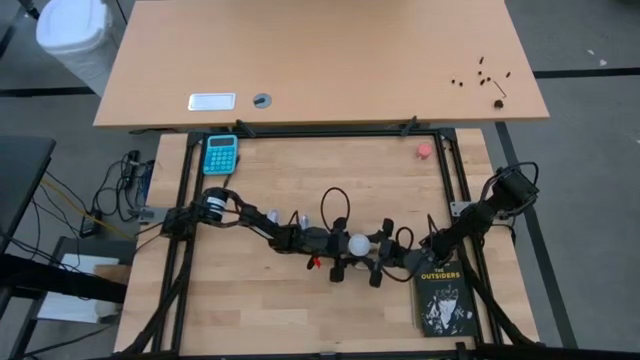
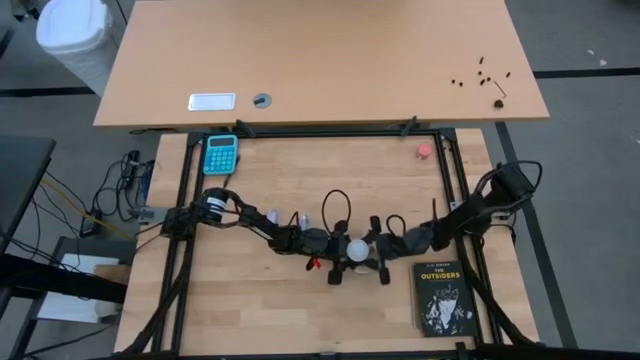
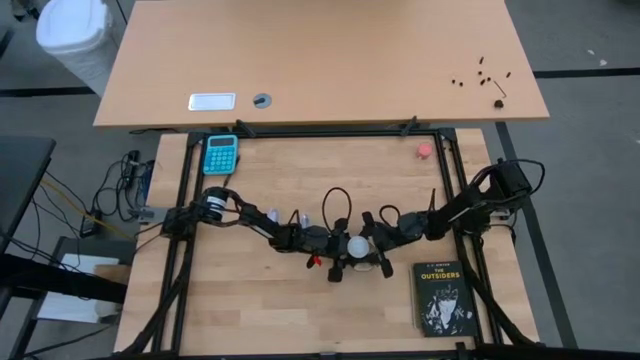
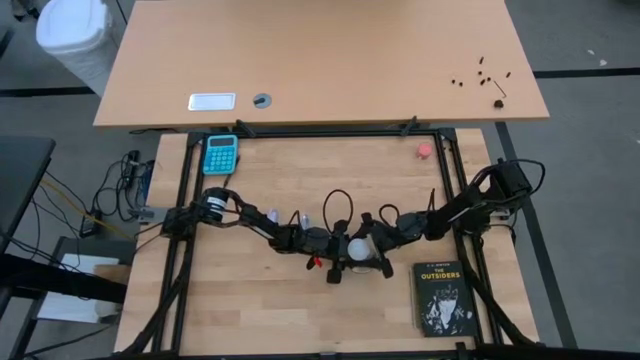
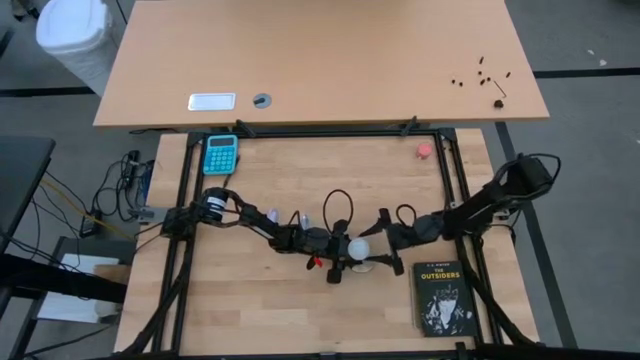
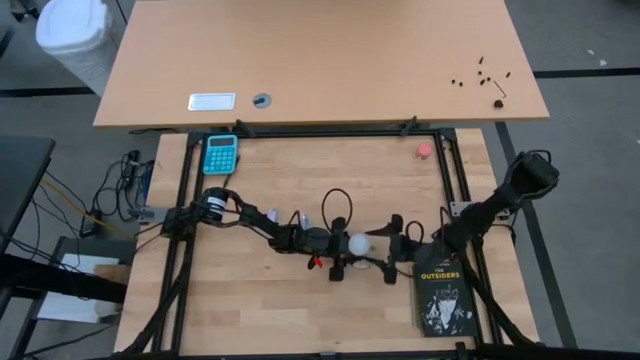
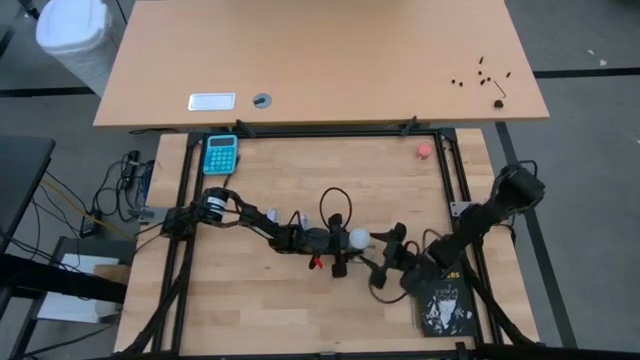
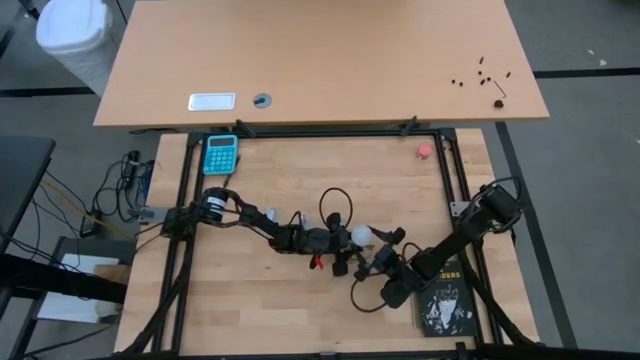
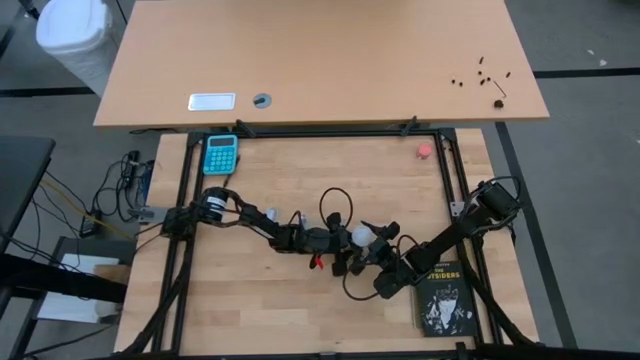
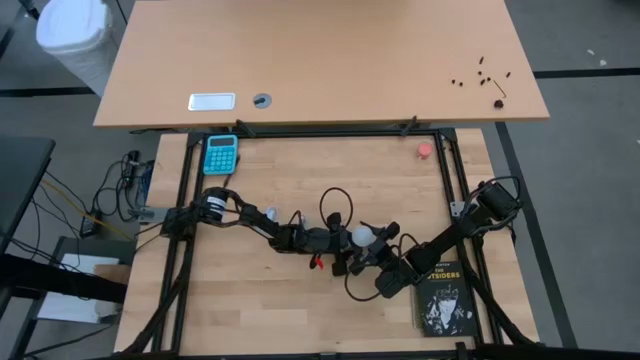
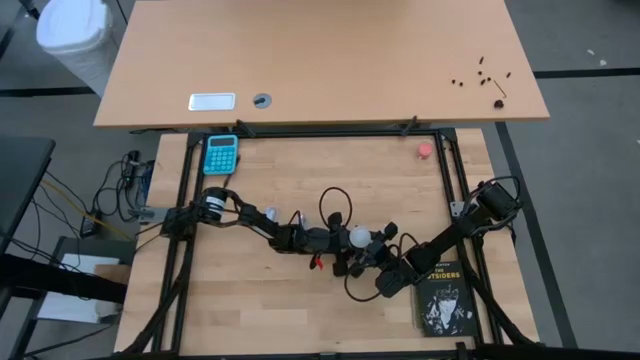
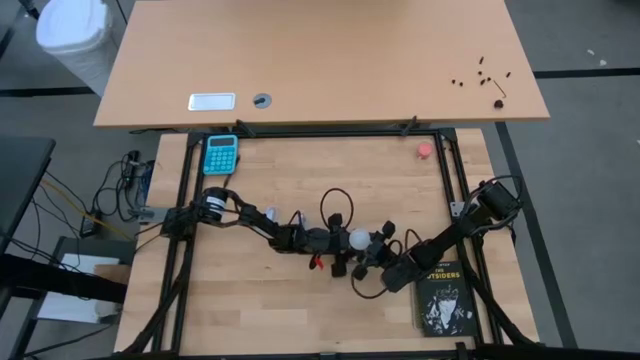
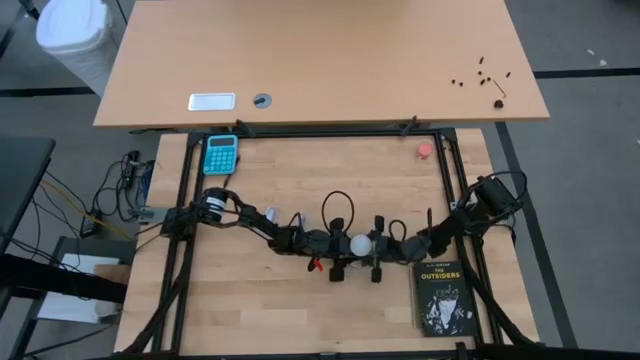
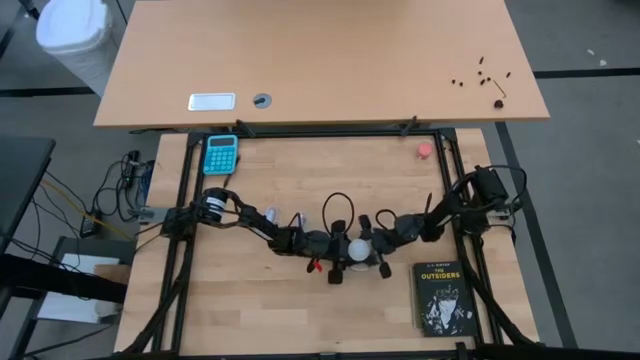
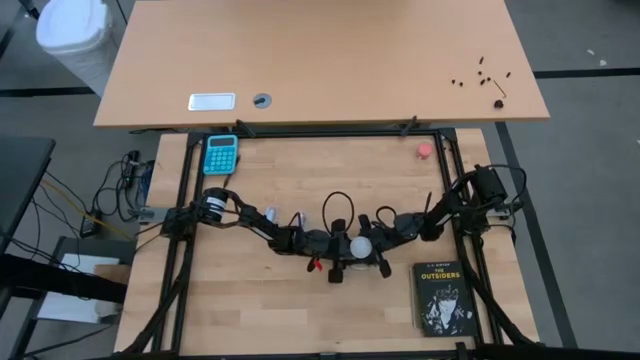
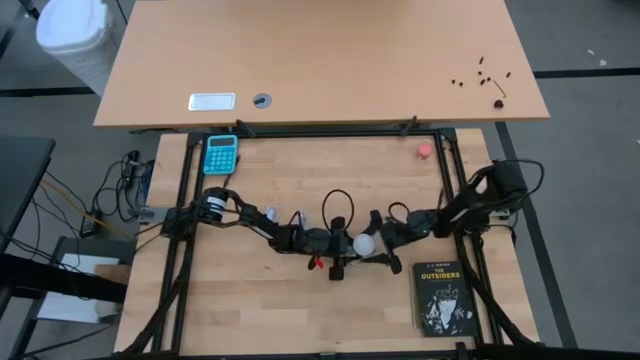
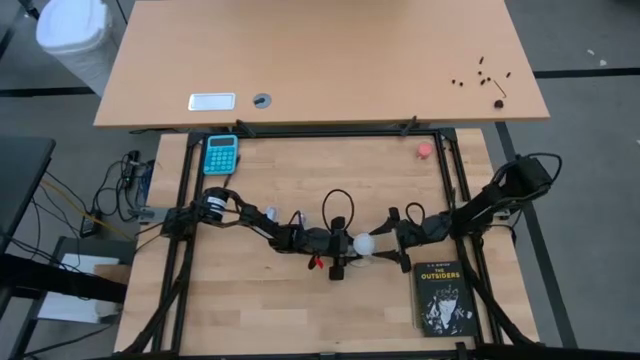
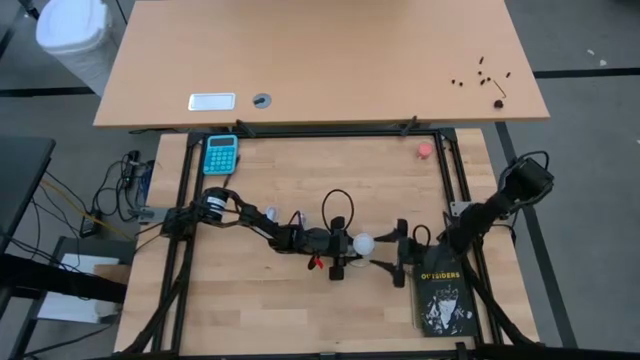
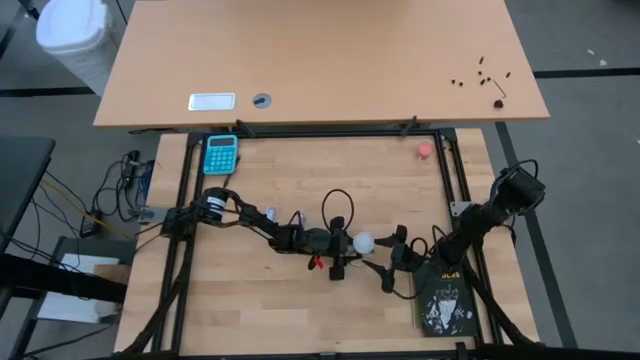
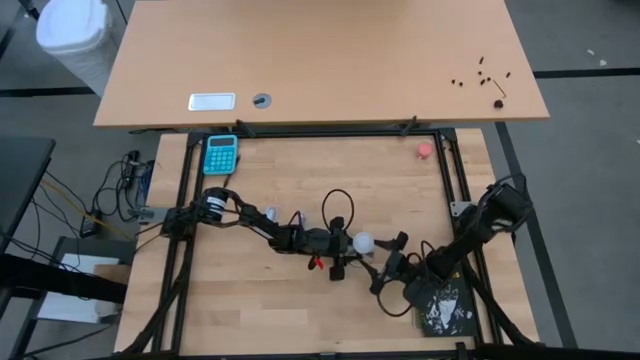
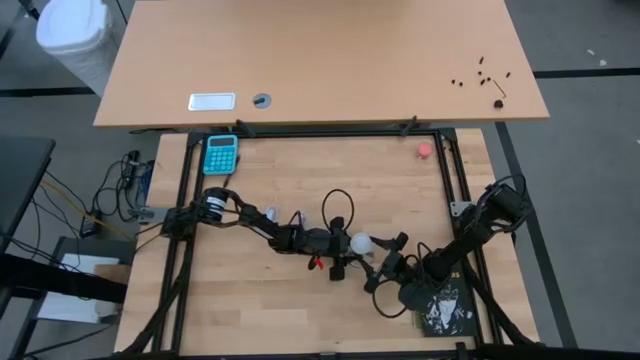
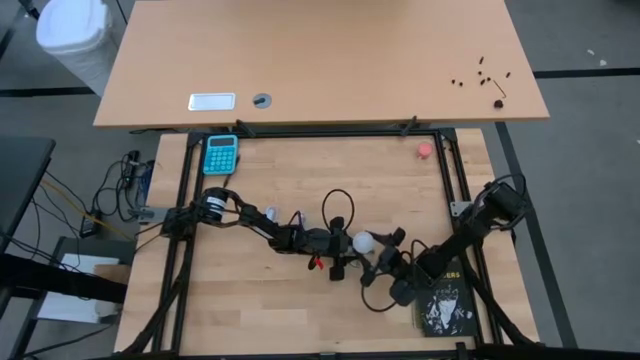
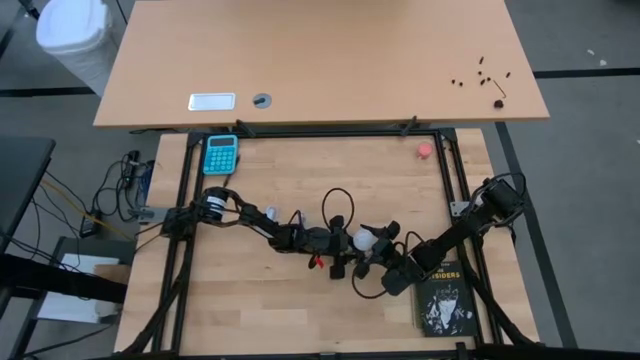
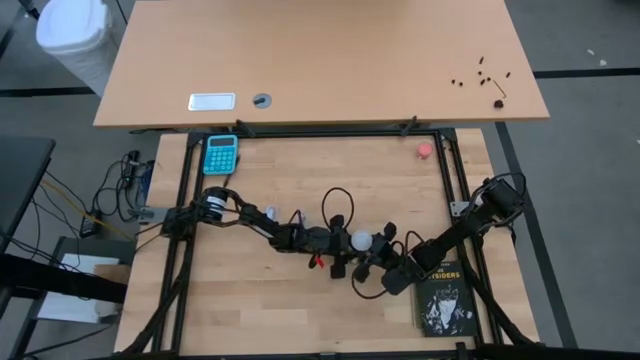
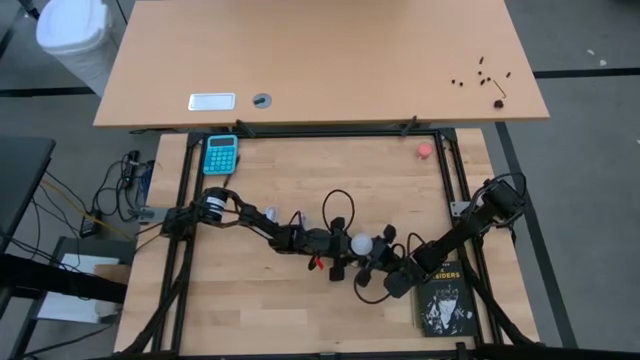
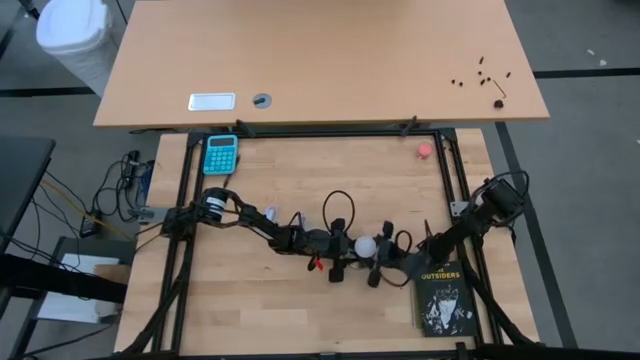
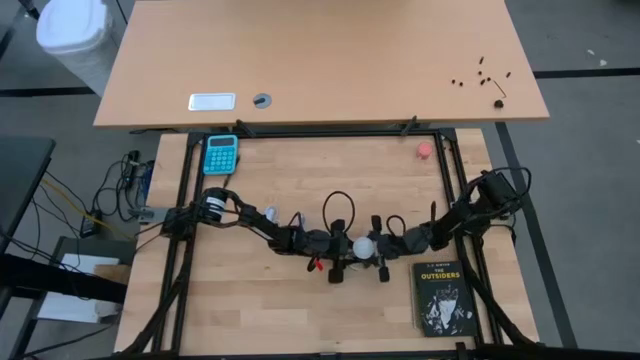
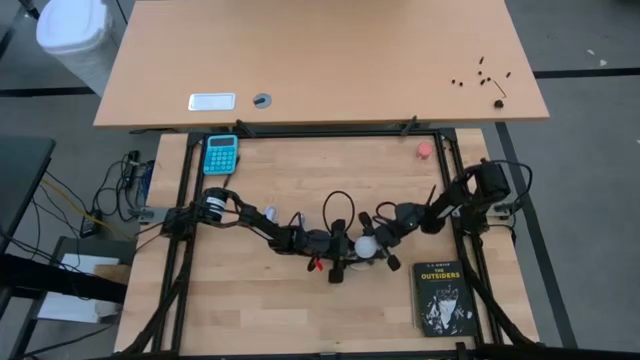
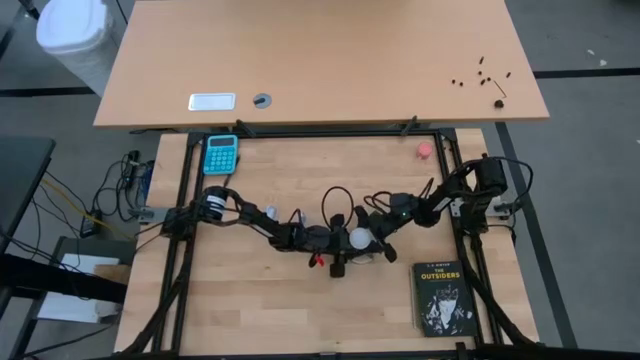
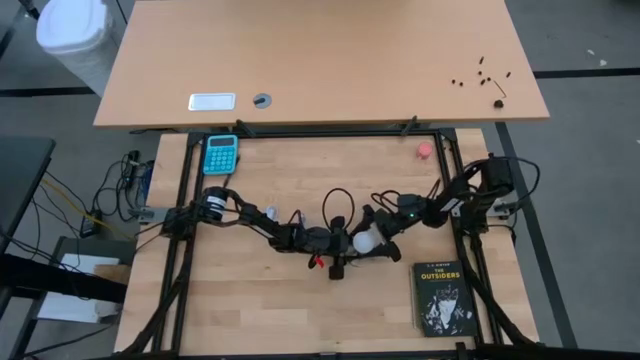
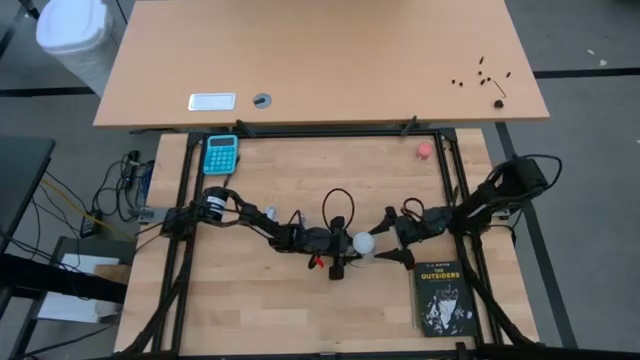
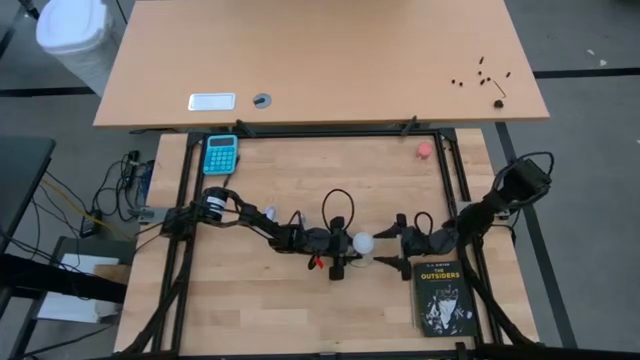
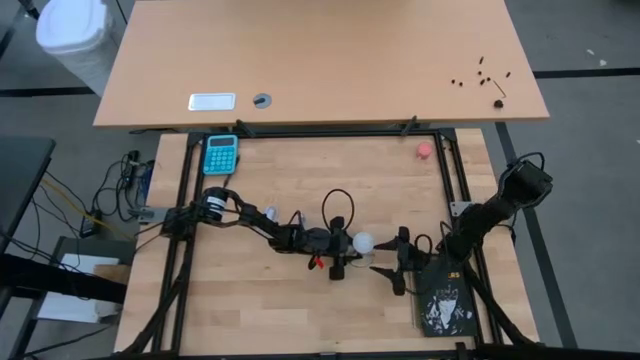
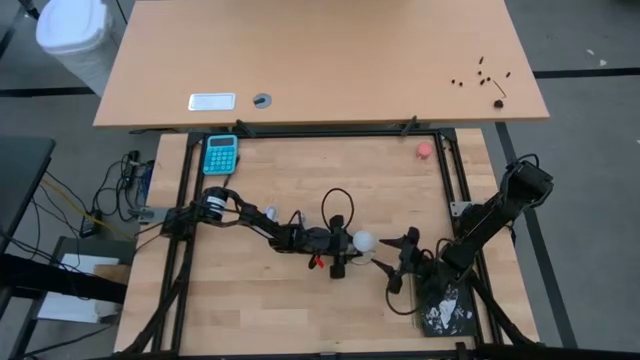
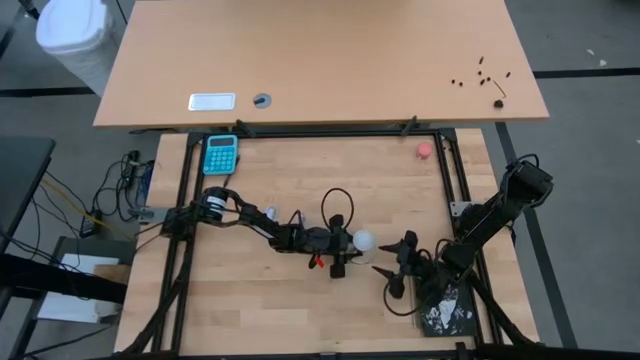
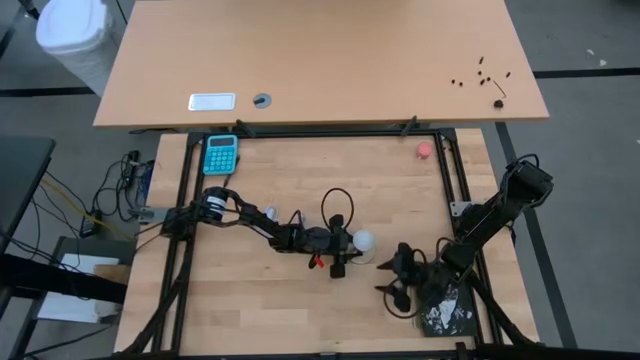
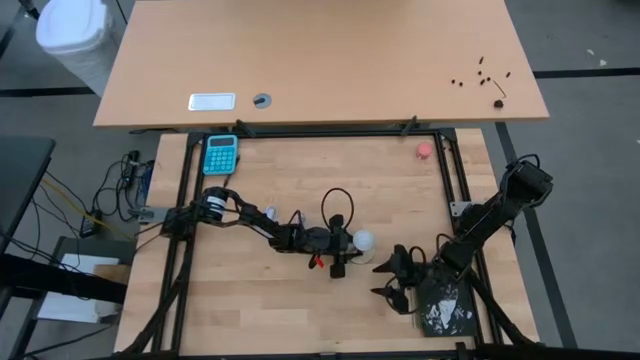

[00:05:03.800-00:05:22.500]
Task: Screw lightbulb
Remove the lightbulb from the lamp

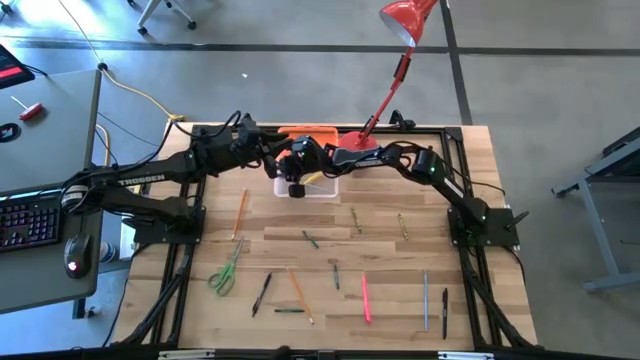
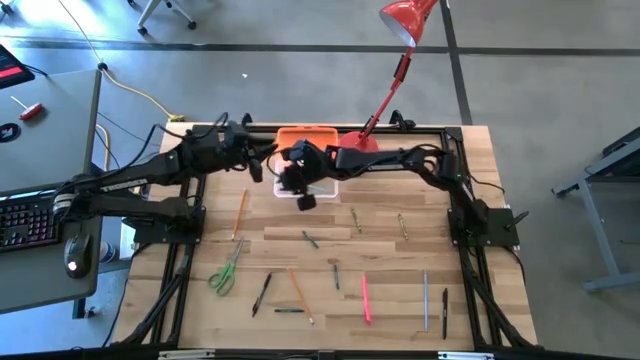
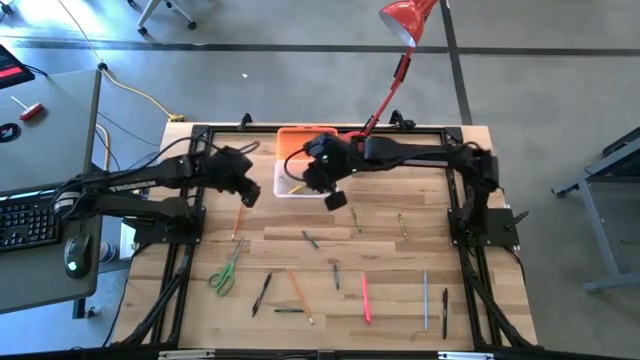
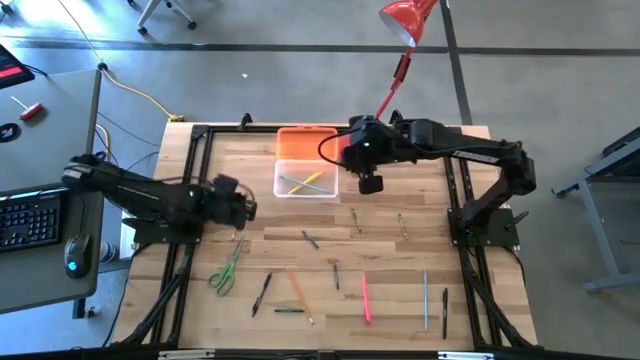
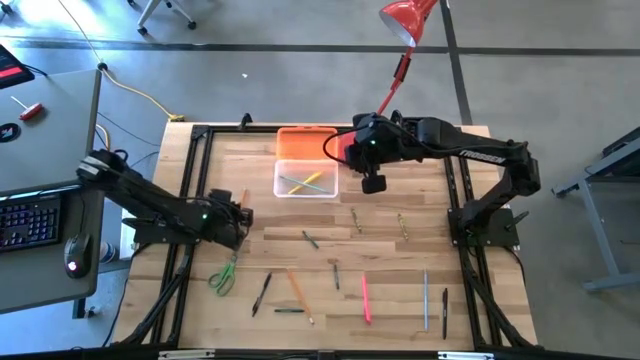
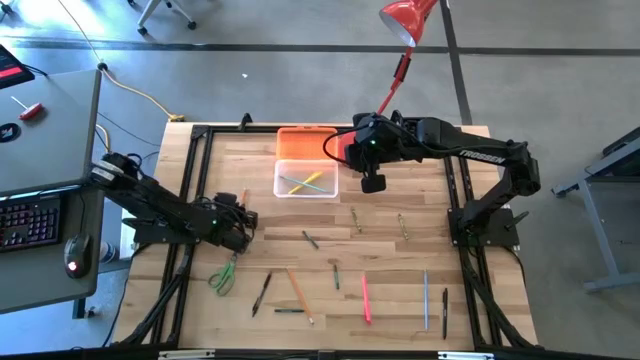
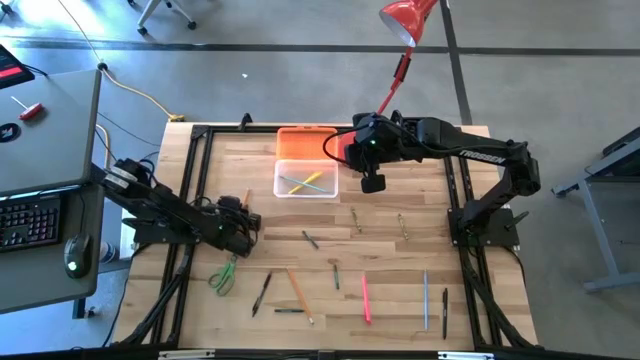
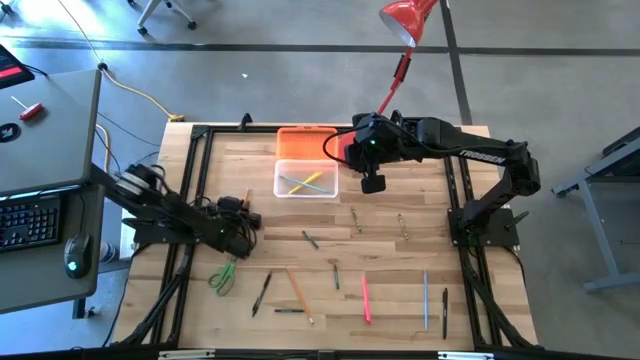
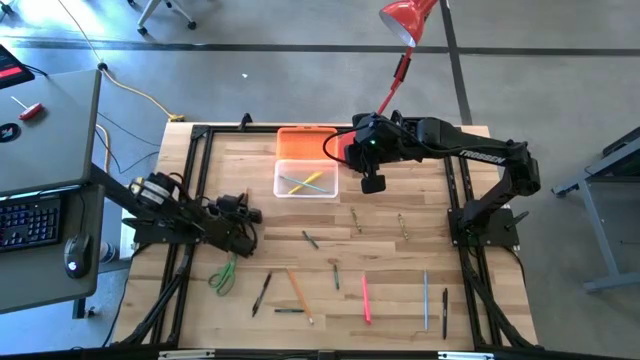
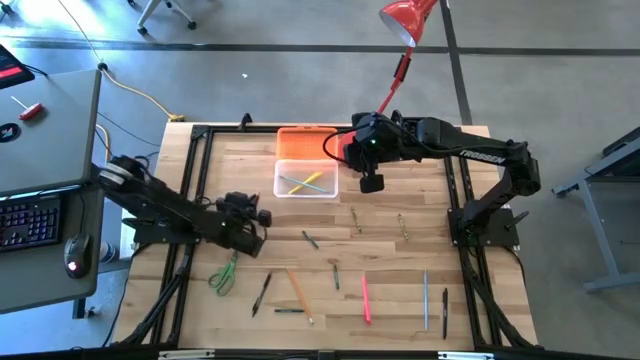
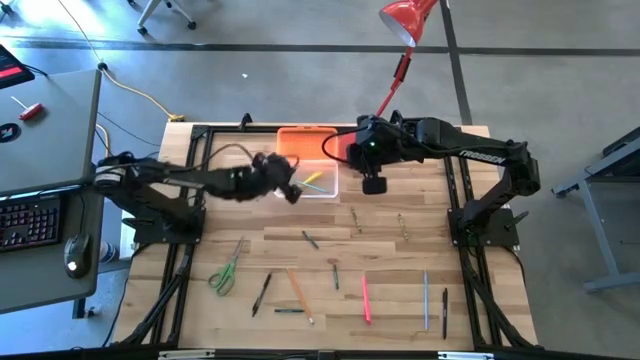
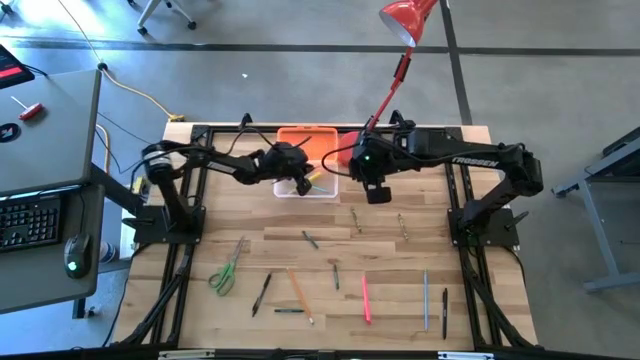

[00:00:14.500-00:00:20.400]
Task: Pick & place school supplies into a supply box
Put the top orange pencil into the orange supply box
